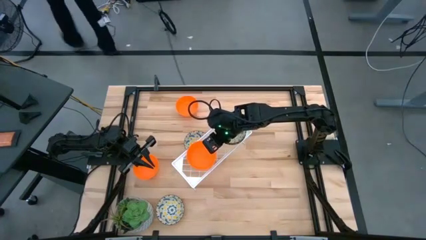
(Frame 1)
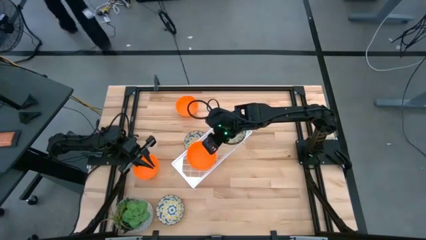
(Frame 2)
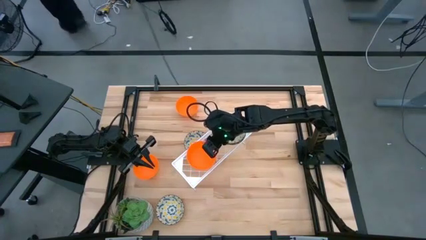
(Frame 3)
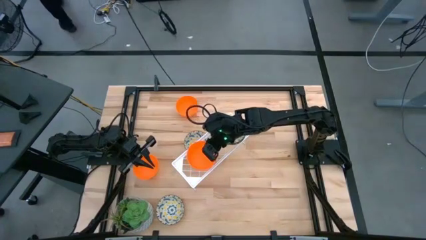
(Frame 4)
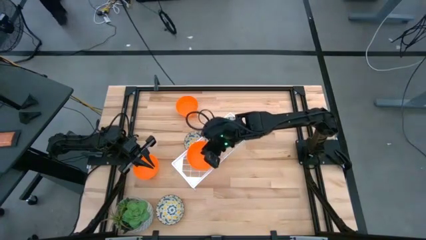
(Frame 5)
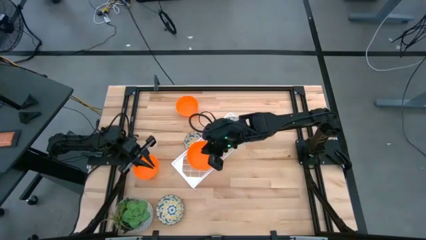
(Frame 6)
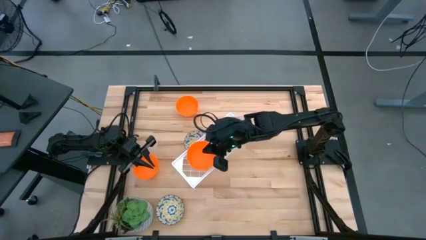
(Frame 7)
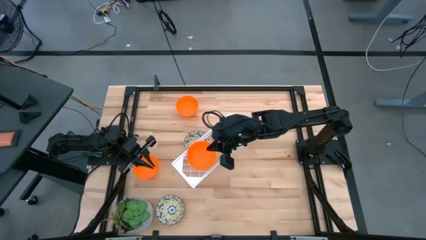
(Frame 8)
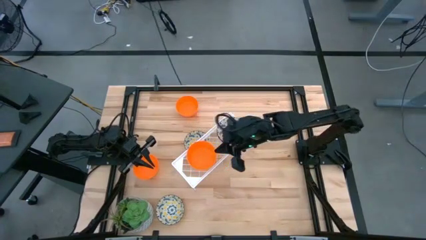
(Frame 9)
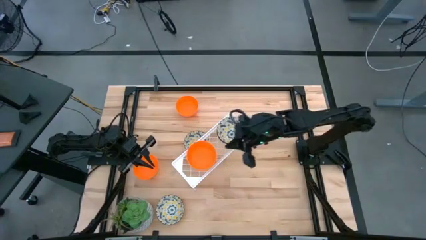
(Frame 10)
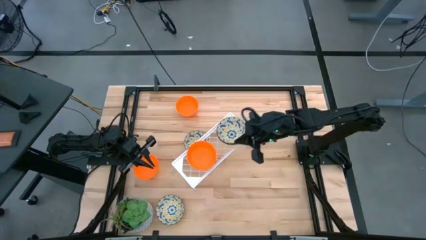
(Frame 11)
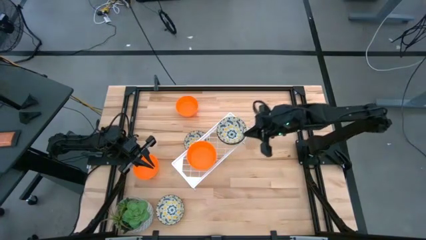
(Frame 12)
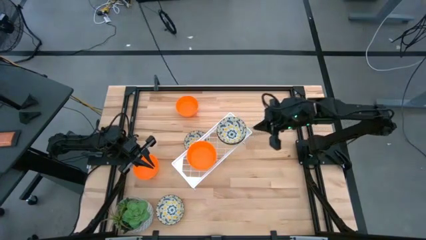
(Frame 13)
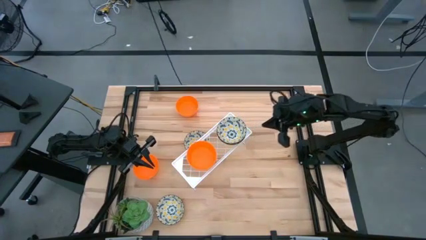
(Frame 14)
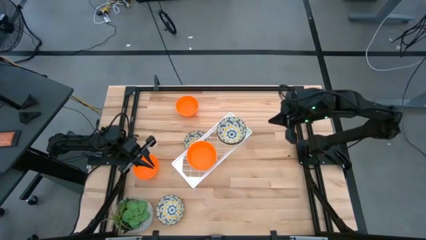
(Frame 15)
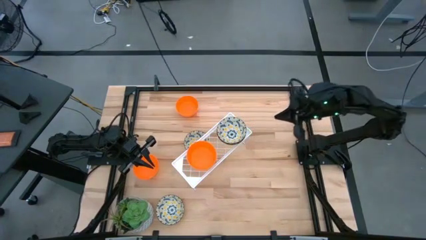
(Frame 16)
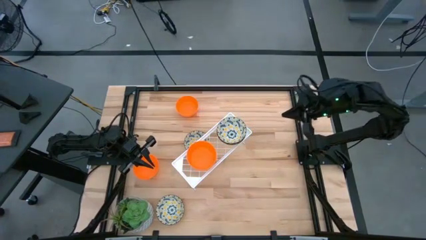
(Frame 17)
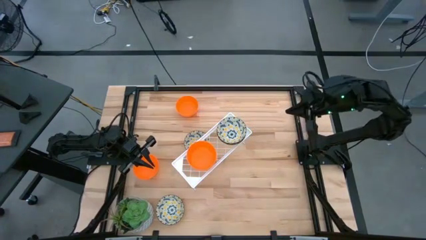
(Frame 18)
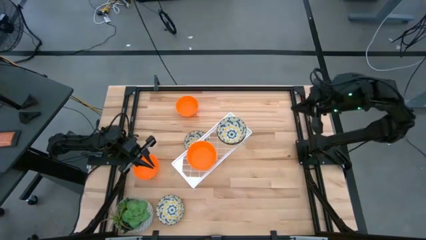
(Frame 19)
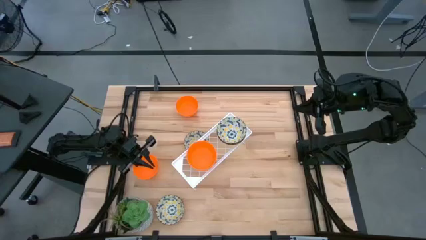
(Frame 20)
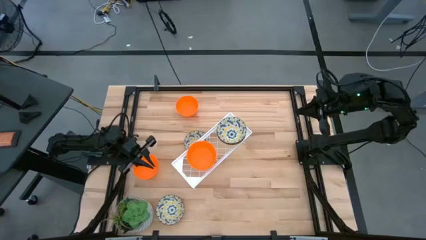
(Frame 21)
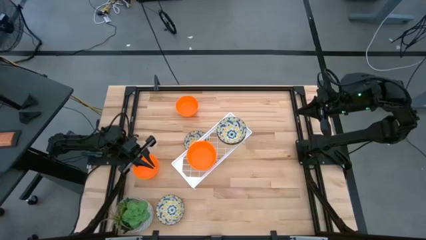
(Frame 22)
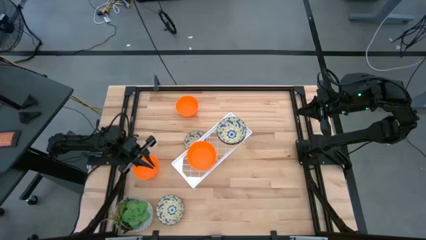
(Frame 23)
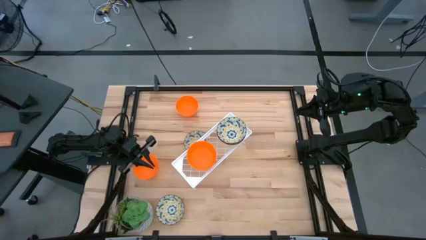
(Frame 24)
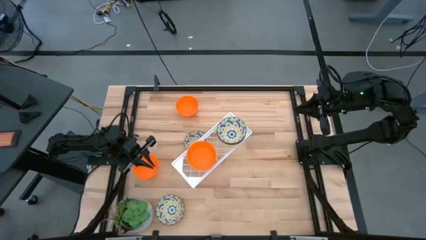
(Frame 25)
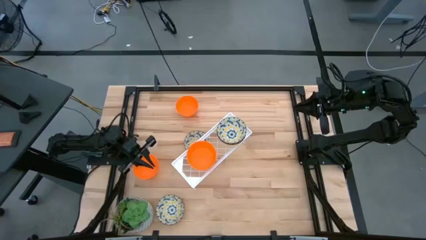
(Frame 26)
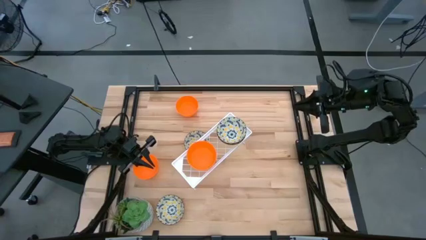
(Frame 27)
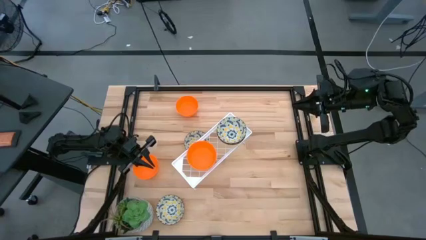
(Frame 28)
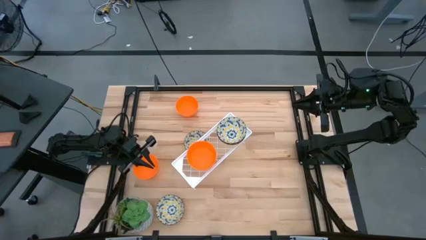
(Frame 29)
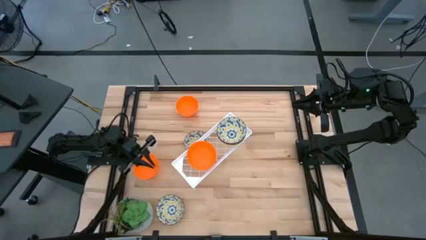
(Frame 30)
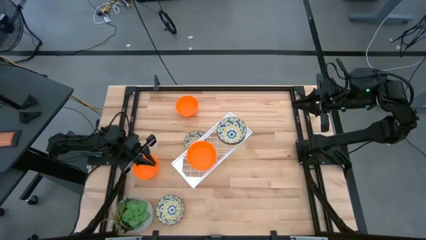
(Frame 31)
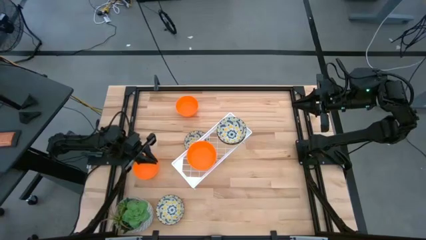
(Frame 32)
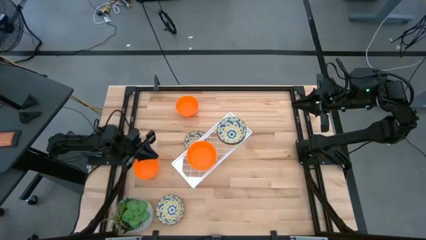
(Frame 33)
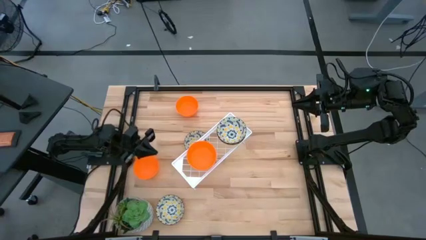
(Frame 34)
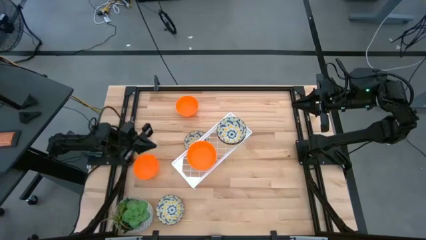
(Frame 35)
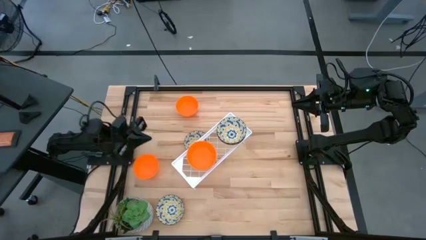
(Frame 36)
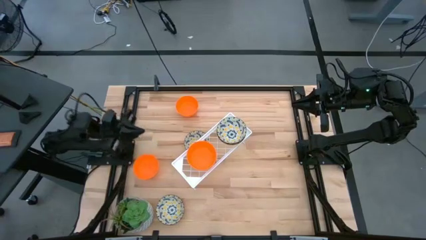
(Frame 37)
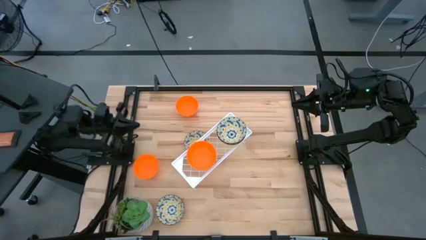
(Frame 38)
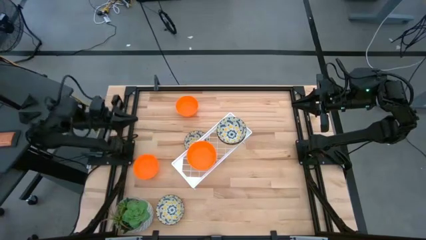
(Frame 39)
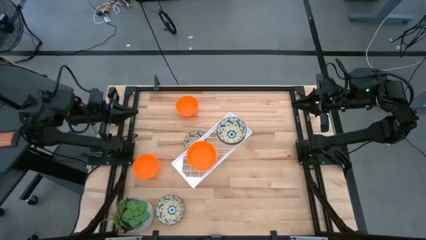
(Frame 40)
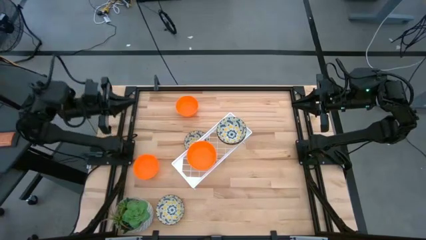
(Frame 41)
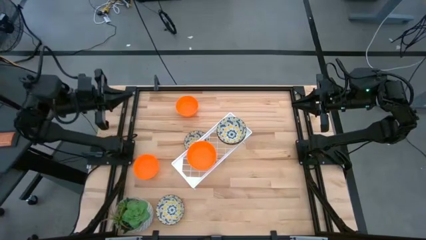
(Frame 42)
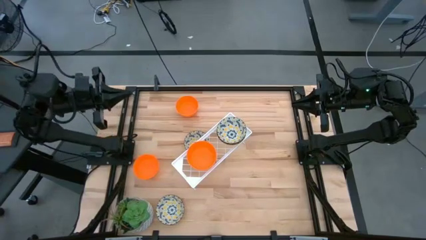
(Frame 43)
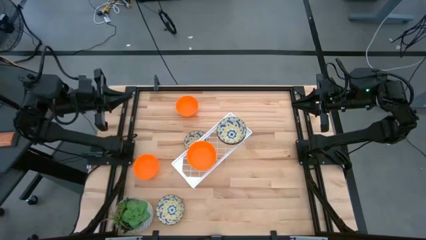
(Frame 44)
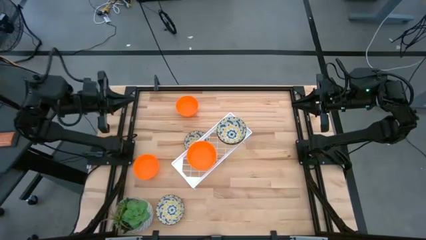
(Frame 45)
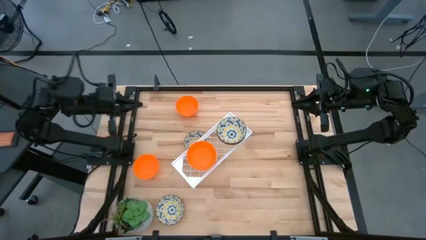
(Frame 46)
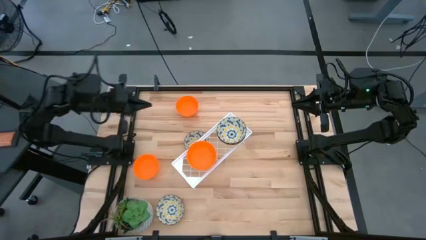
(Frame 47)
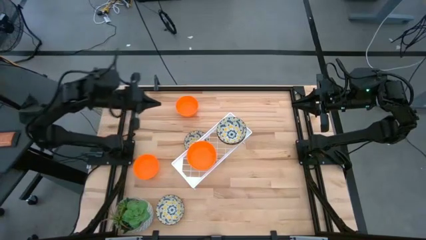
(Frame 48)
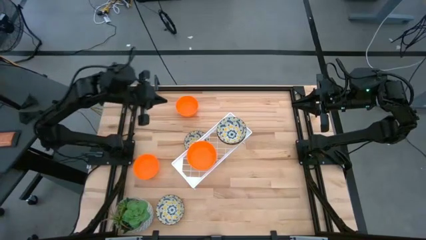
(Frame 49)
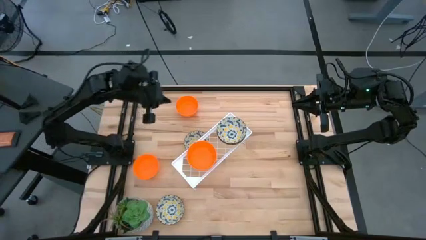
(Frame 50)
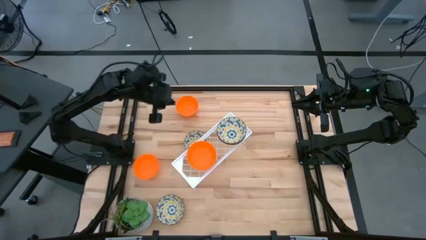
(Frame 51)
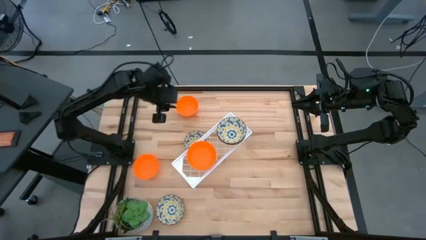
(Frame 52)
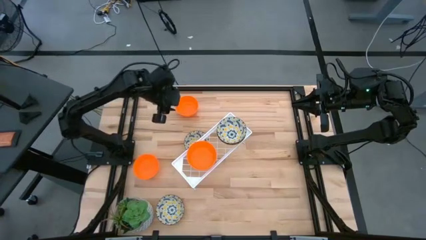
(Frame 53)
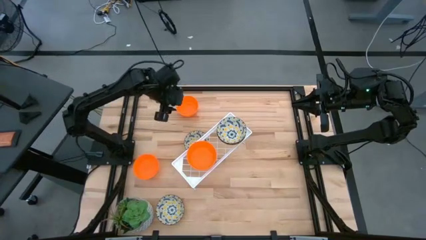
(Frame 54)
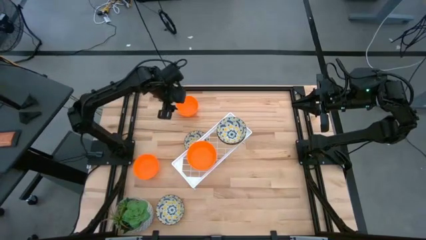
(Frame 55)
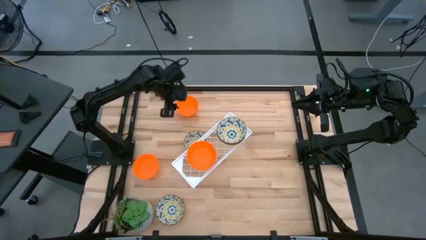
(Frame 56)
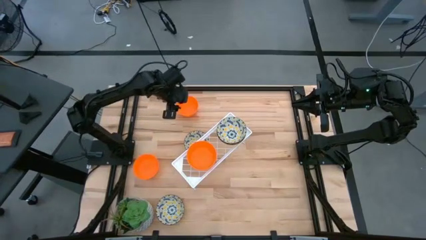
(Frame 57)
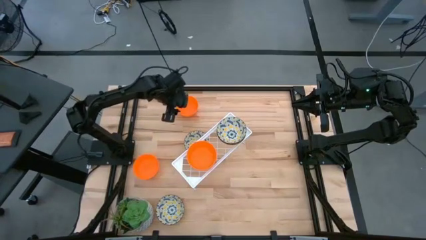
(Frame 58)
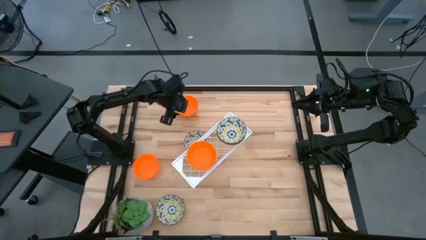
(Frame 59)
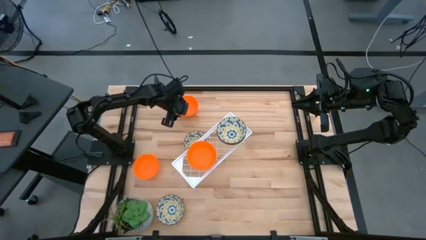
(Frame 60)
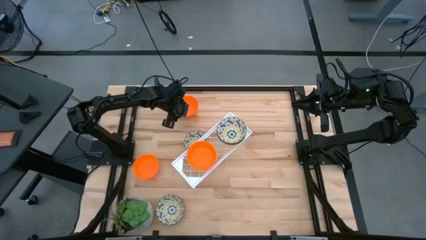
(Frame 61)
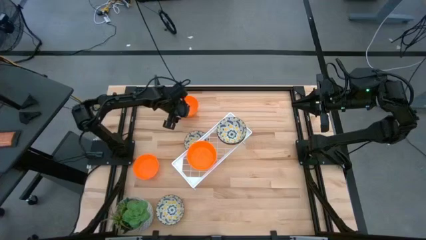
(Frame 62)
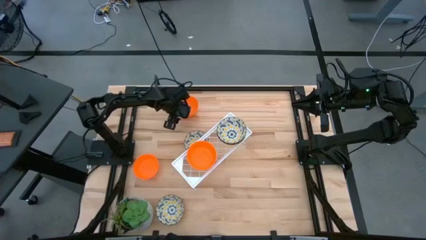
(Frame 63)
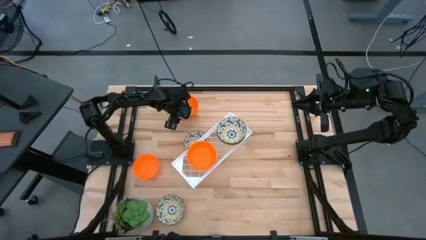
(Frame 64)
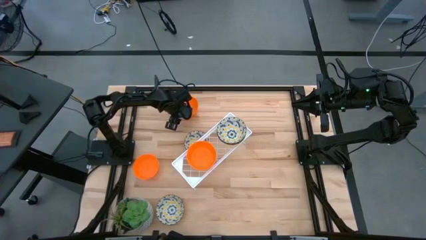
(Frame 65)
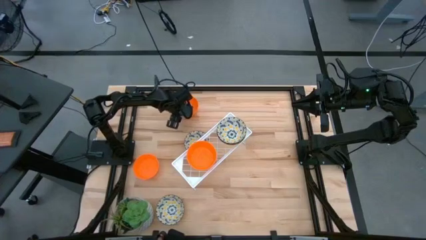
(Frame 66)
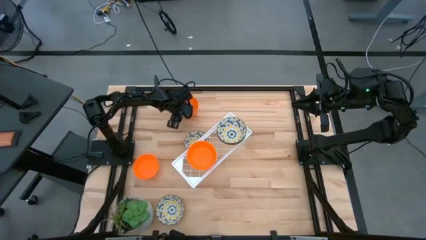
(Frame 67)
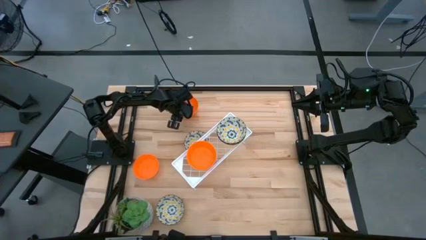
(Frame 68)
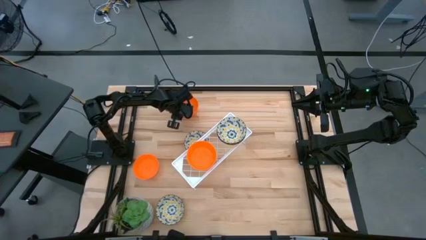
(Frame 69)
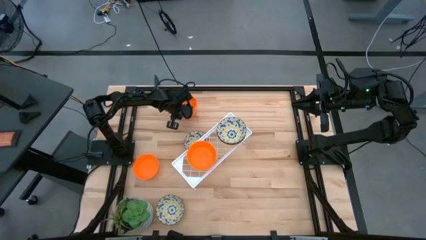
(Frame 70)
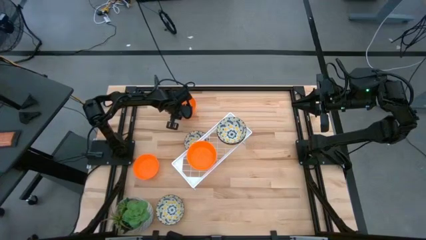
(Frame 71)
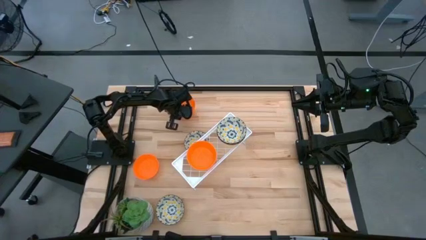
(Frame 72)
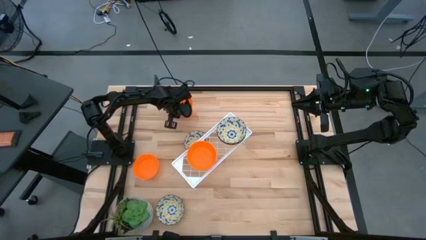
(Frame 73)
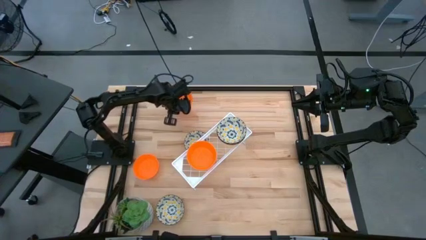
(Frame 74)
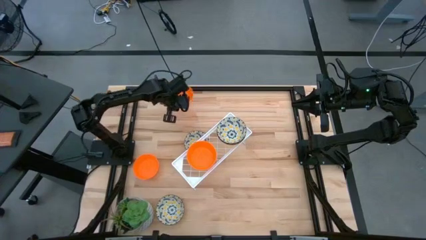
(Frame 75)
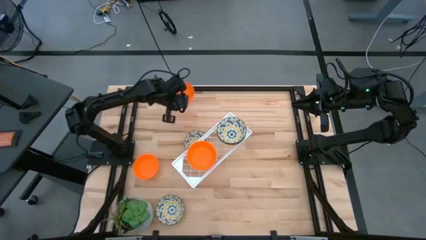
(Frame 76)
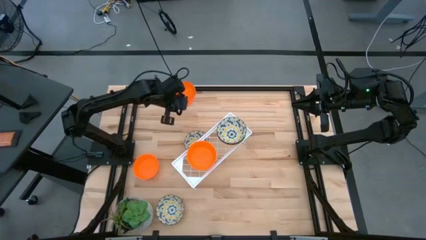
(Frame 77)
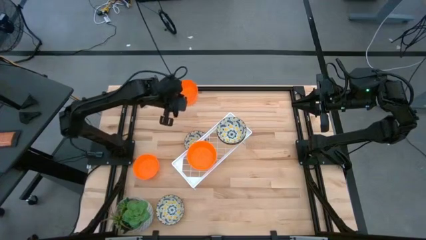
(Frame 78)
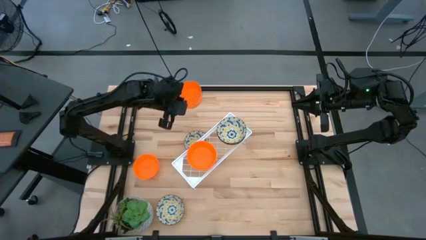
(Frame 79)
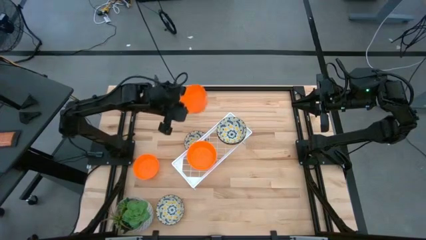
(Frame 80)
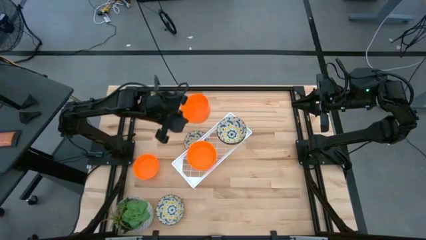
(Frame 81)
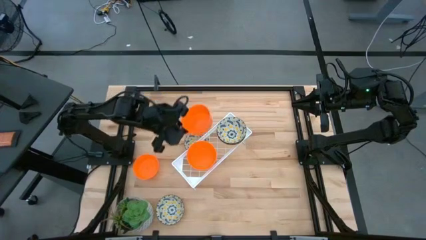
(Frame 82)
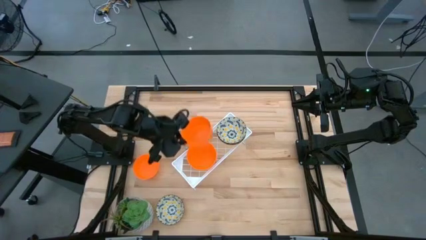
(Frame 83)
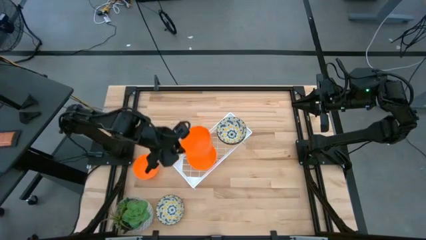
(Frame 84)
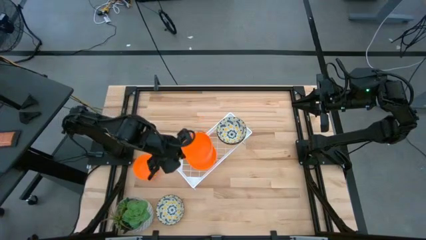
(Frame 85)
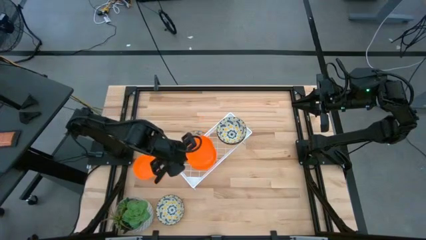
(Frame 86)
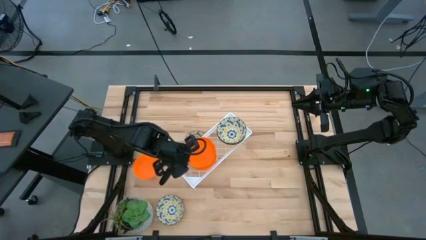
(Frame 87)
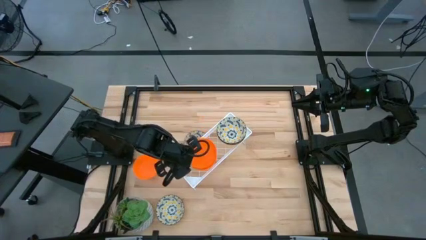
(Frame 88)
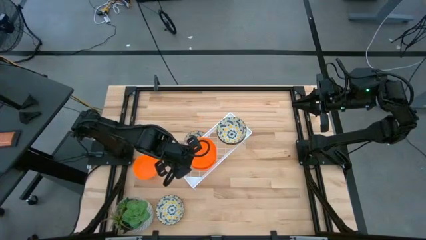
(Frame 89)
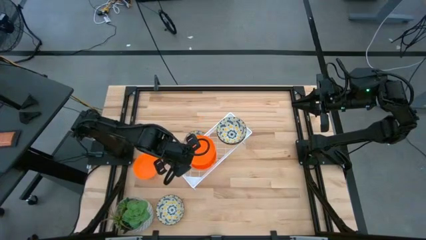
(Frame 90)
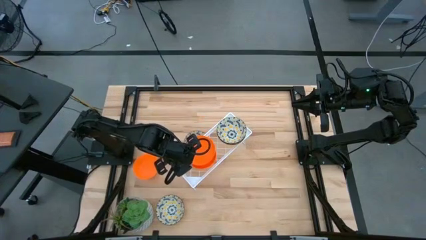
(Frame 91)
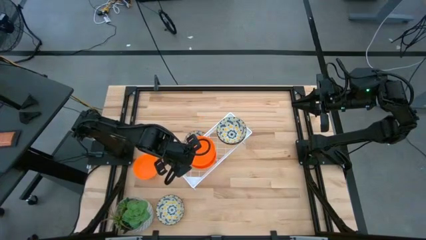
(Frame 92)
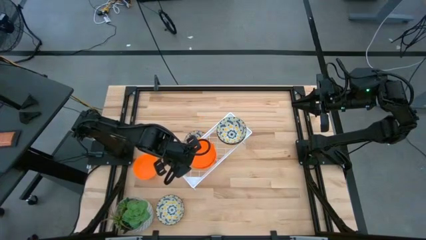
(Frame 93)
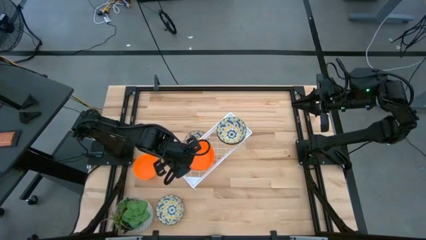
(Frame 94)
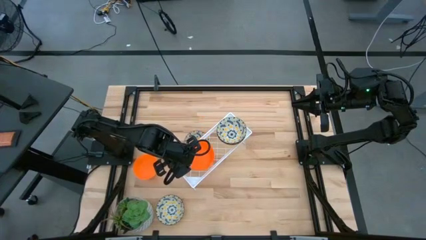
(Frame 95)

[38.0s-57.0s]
Task: Pick & Place Mini bowls
Stack the orange bowl on top of the orange bowl on the shelf
